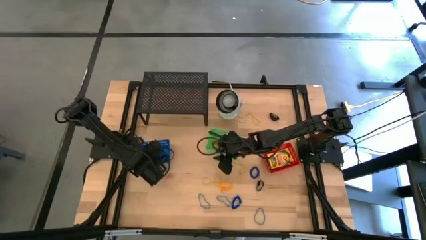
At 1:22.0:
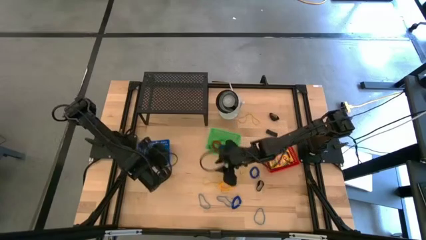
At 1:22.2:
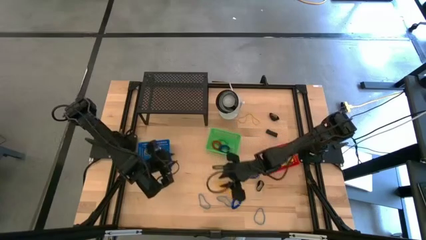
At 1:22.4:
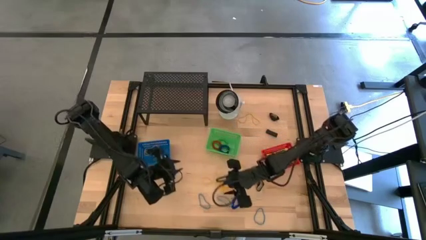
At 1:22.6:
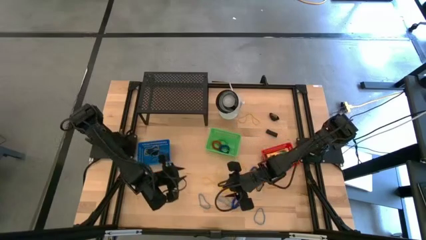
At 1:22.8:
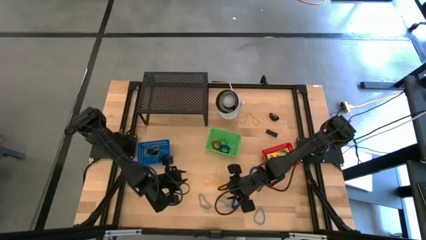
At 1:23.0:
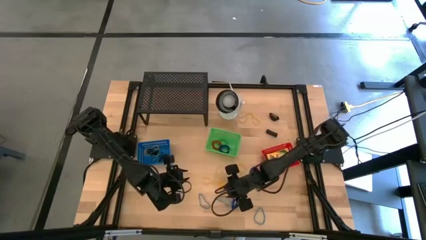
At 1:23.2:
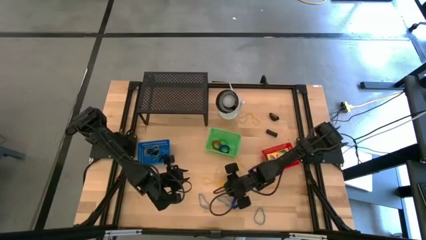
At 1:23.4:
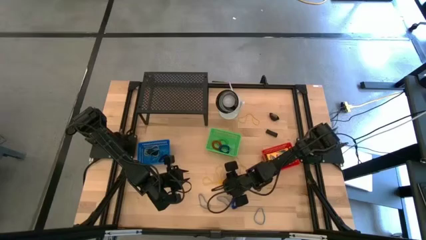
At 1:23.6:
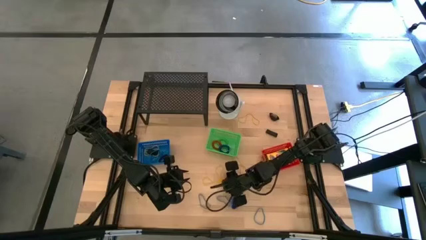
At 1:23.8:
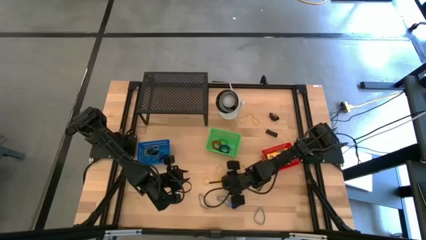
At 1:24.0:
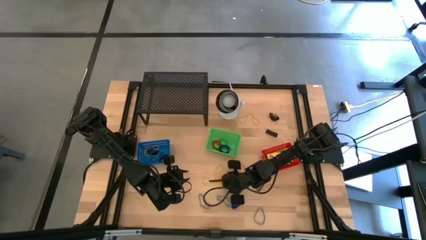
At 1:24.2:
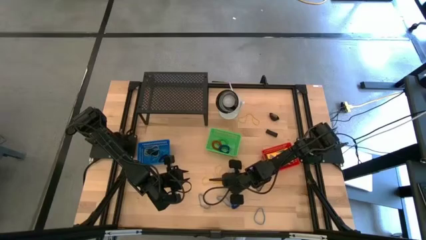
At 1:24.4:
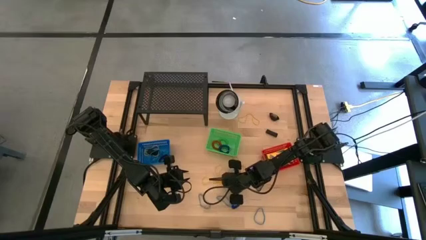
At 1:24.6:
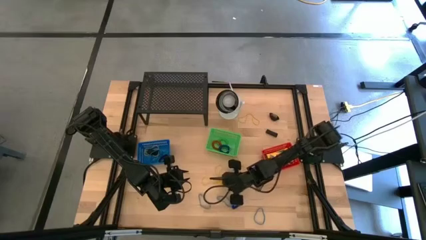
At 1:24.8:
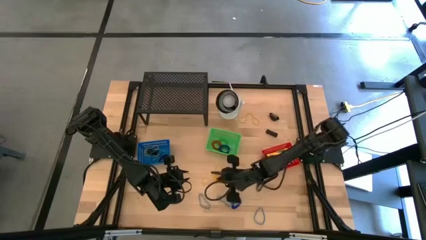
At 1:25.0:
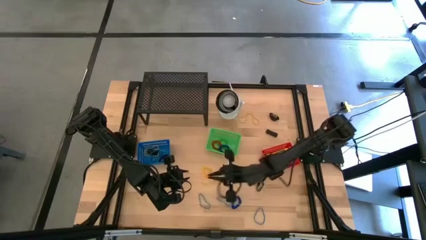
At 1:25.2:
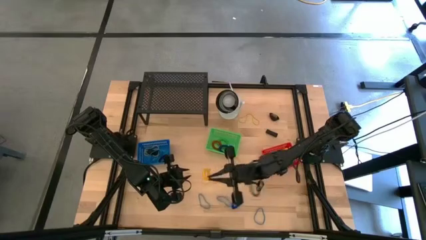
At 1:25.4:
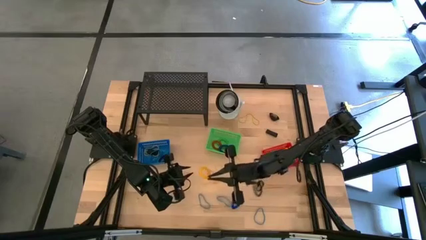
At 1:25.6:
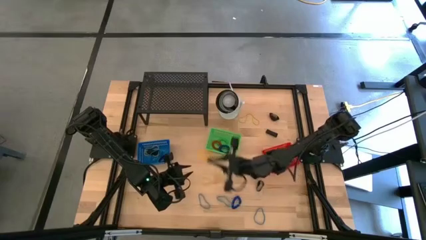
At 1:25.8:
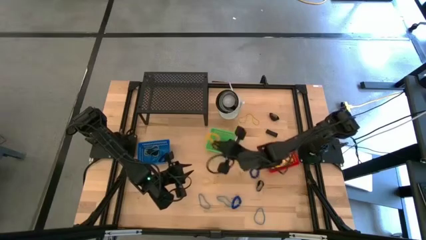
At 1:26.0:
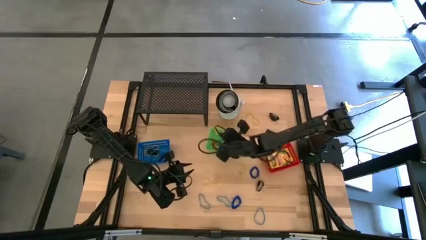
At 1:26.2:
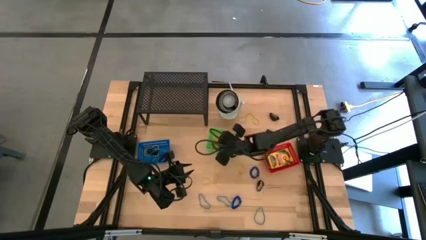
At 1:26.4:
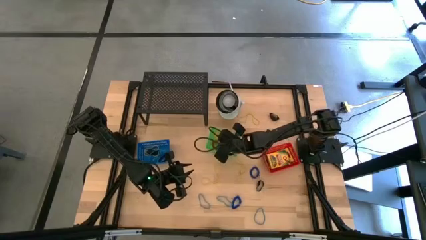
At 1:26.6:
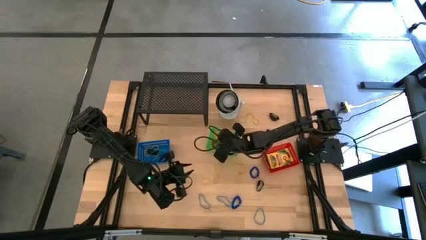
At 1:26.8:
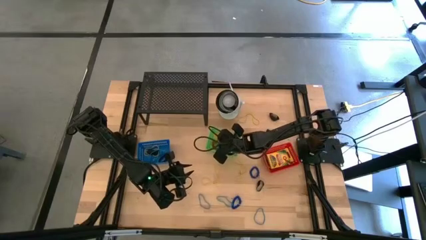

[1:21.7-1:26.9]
Task: Pick & Place Office Desk Supplies
Put the yellow spring keychain into the green bin

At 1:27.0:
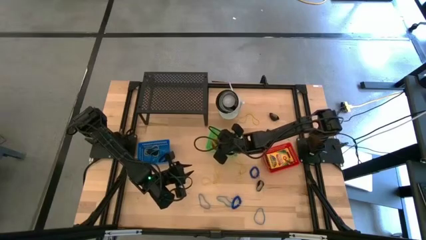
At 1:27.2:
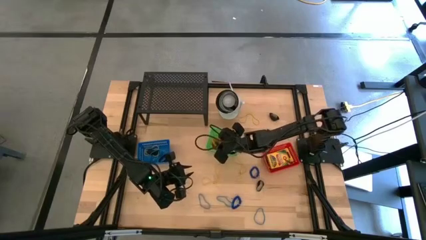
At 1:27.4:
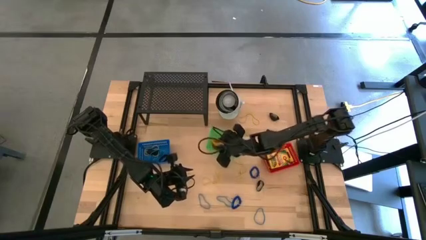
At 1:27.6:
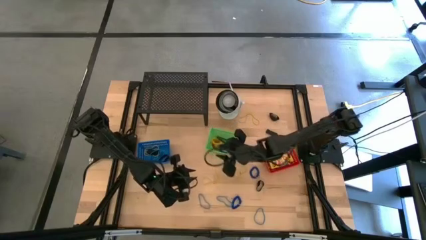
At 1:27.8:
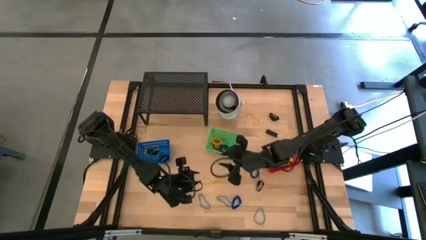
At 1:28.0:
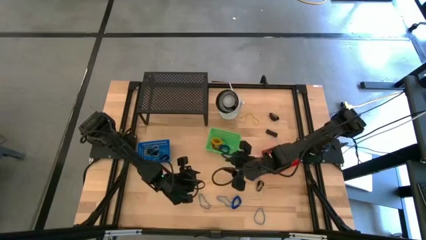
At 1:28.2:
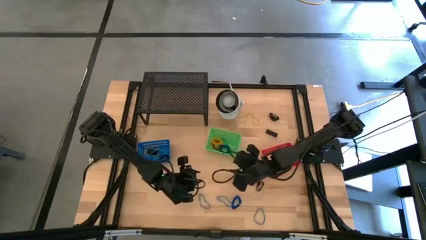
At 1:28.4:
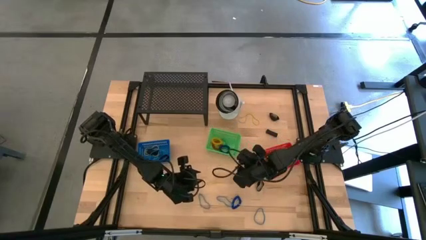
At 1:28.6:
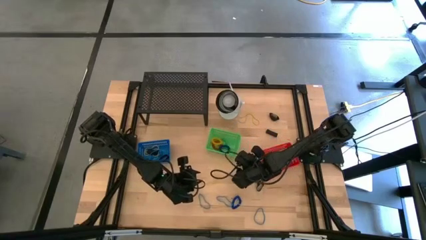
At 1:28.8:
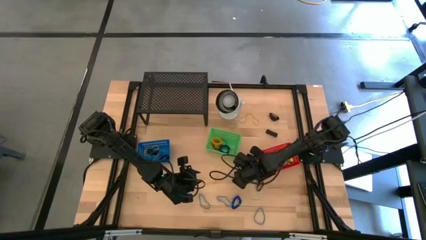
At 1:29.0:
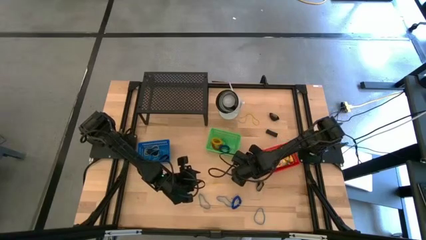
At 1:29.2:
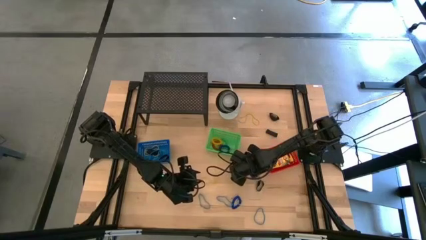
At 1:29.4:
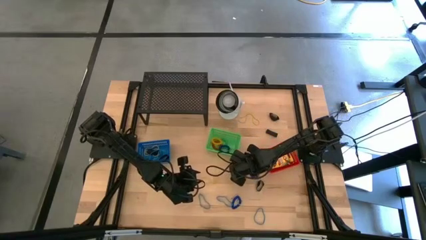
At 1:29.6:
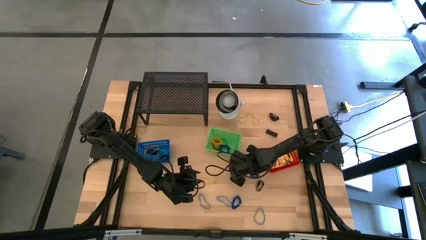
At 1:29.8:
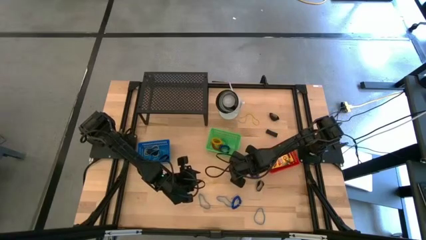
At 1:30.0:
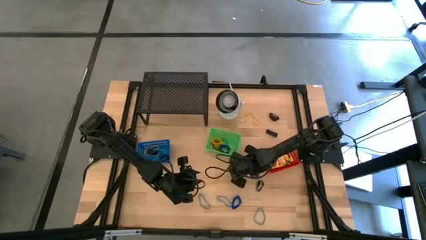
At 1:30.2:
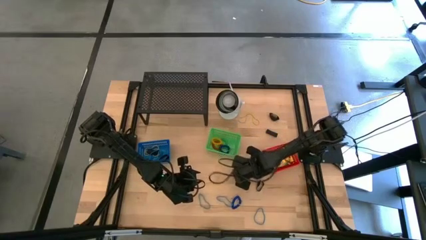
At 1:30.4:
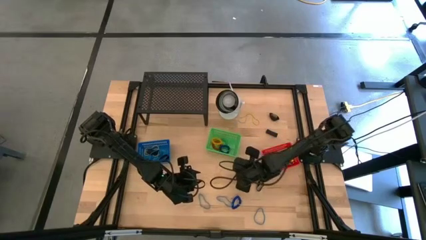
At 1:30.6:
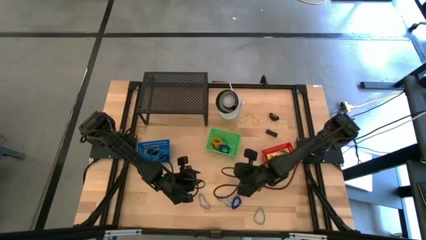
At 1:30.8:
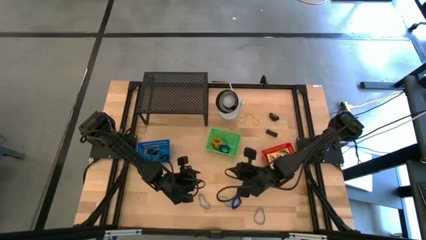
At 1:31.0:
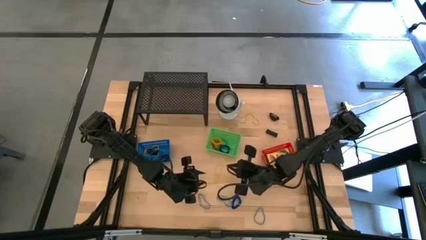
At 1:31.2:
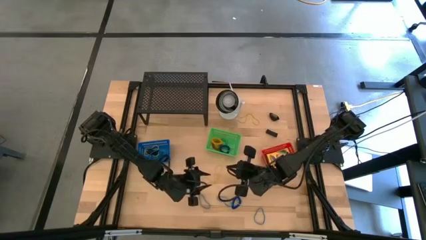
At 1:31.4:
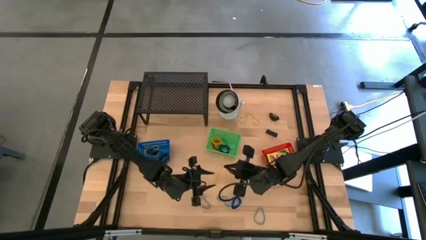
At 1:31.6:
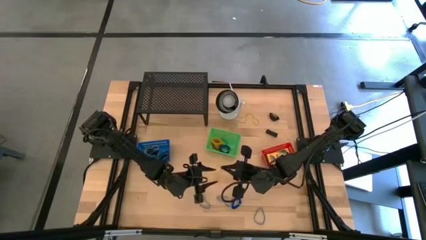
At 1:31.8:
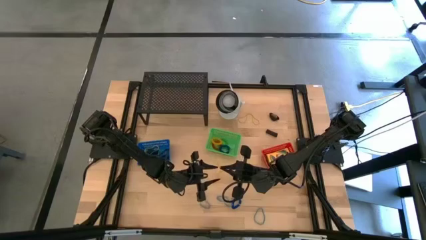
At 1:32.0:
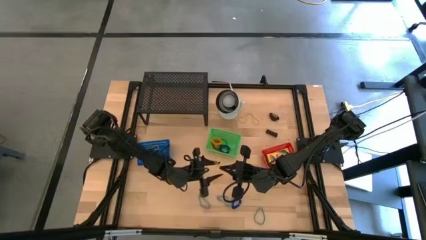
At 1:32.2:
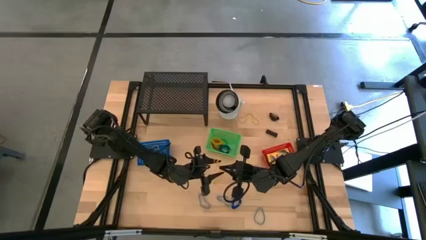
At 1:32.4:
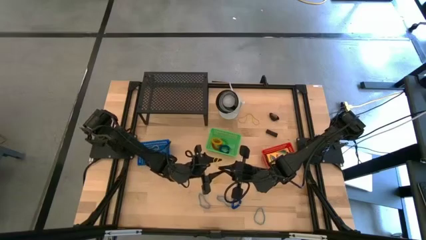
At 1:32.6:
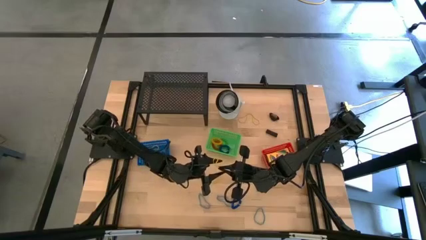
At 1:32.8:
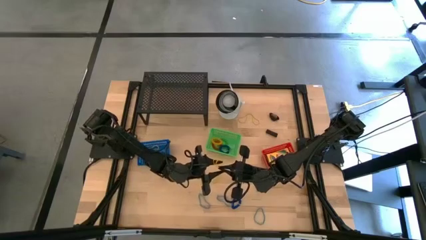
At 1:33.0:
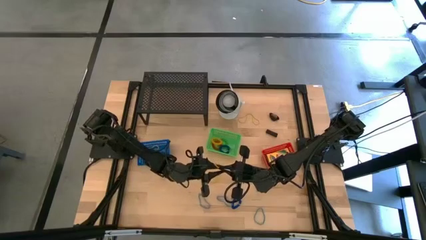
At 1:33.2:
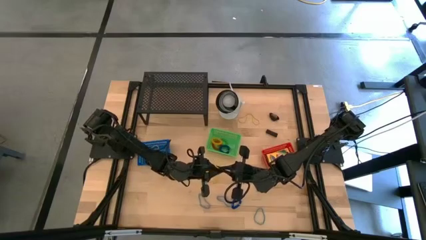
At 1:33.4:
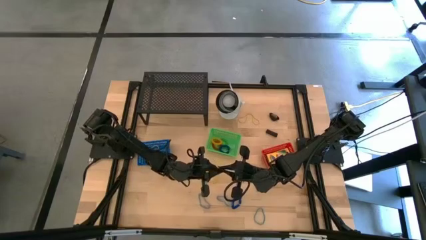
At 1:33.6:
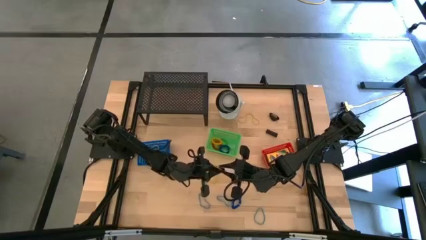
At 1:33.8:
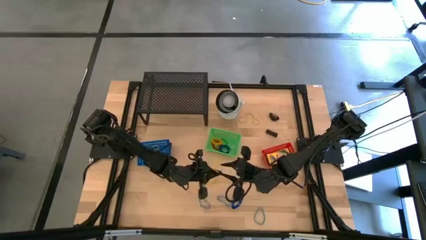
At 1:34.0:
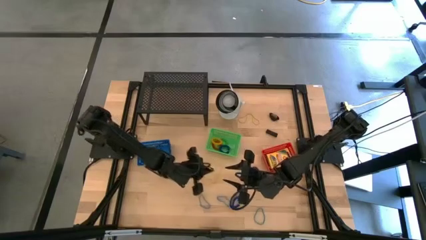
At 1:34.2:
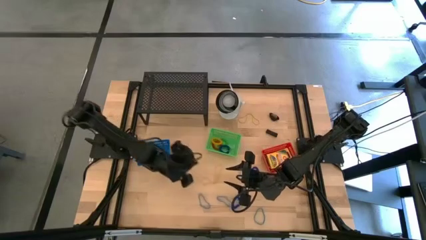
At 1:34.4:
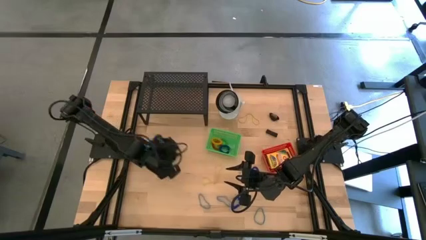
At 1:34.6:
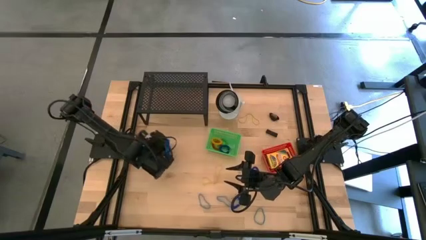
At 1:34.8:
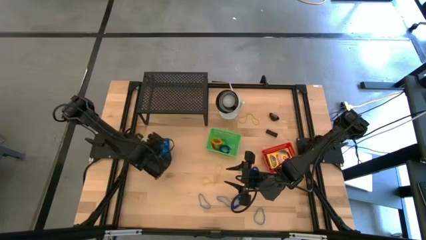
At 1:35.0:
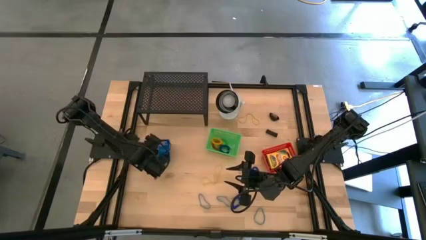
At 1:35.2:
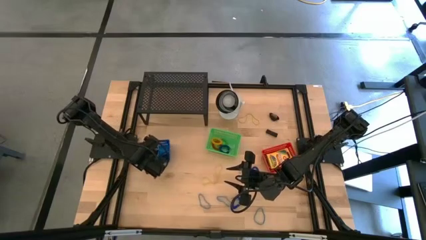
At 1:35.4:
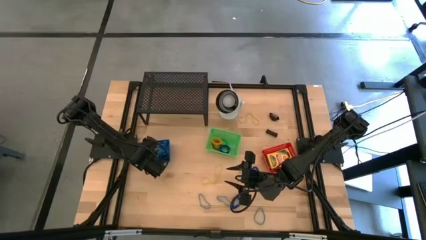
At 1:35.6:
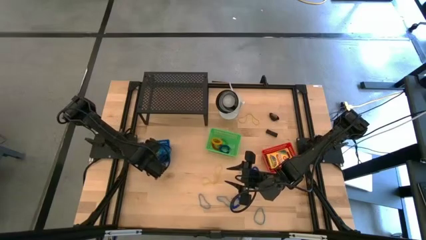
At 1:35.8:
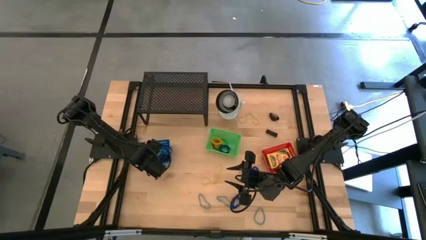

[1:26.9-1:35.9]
Put the yellow rubber band into the blue bin
